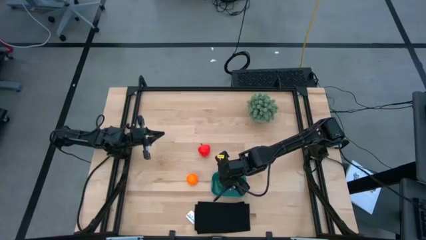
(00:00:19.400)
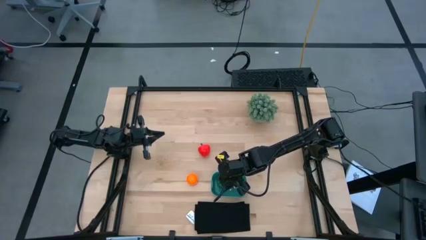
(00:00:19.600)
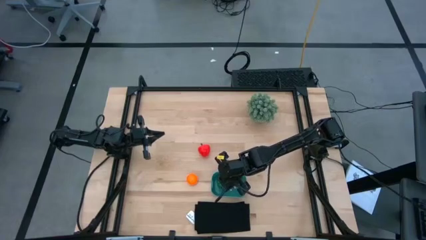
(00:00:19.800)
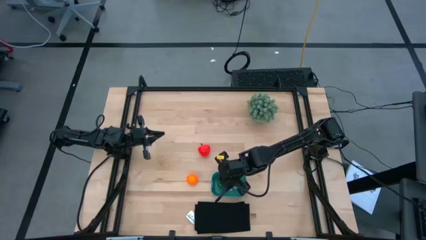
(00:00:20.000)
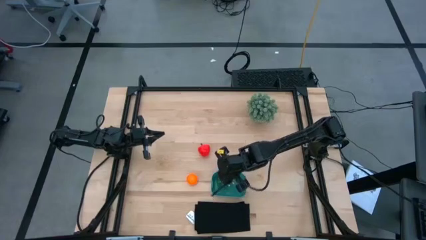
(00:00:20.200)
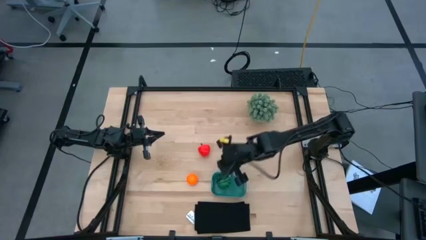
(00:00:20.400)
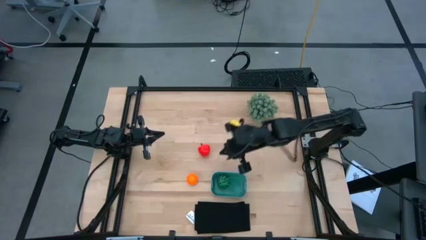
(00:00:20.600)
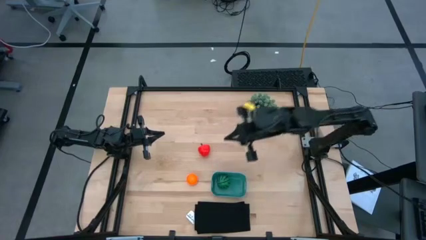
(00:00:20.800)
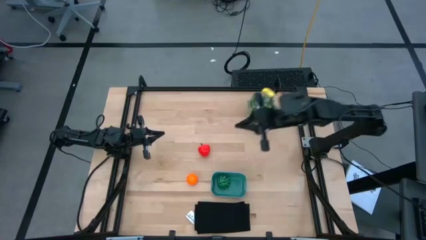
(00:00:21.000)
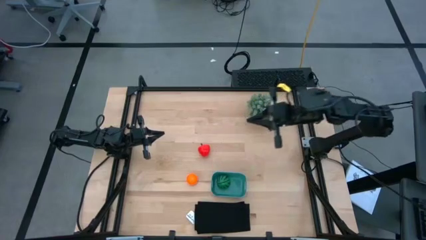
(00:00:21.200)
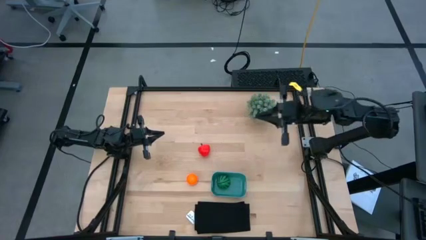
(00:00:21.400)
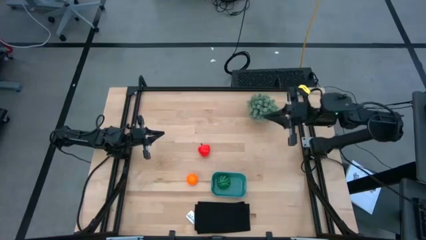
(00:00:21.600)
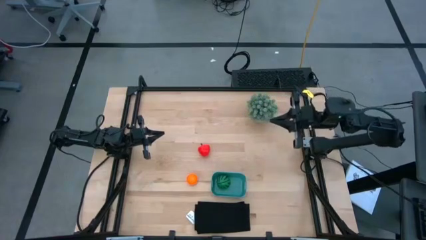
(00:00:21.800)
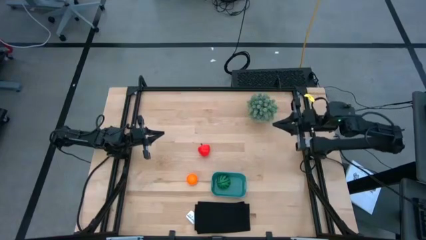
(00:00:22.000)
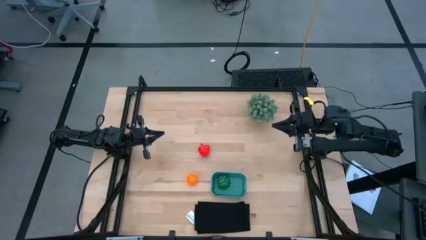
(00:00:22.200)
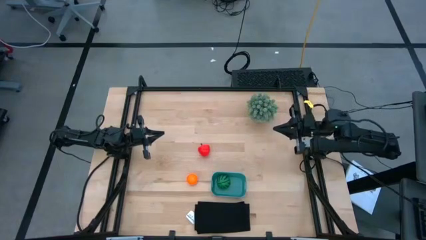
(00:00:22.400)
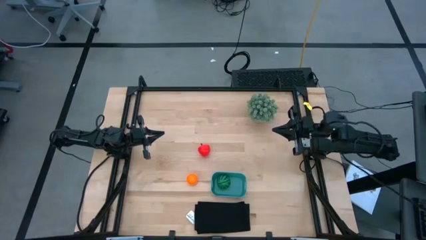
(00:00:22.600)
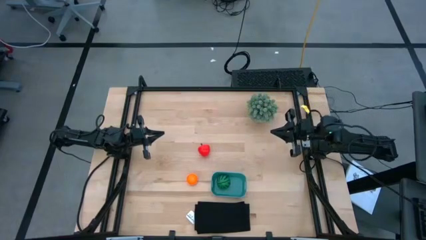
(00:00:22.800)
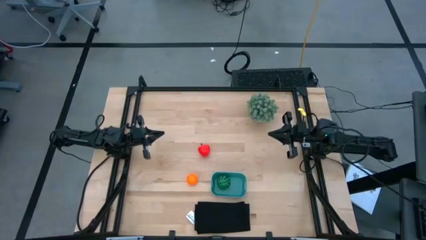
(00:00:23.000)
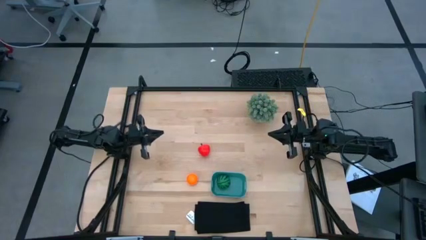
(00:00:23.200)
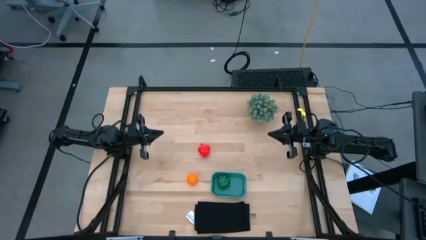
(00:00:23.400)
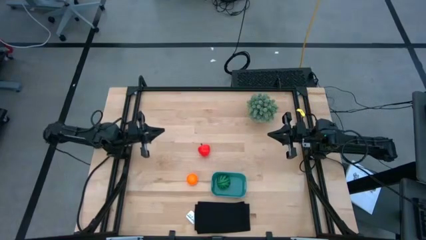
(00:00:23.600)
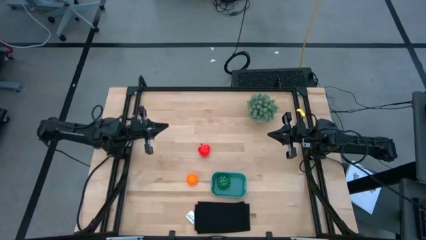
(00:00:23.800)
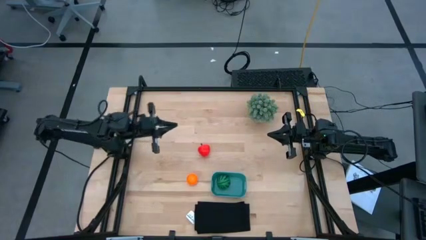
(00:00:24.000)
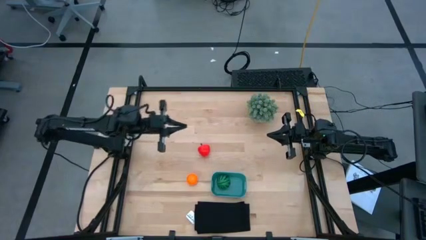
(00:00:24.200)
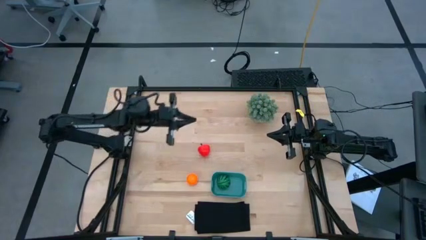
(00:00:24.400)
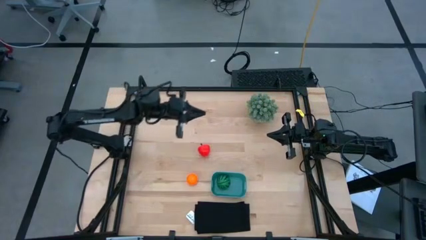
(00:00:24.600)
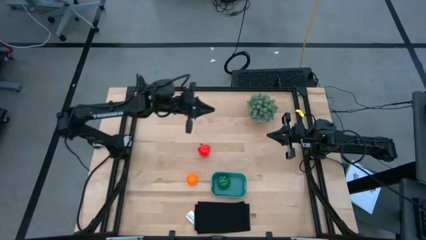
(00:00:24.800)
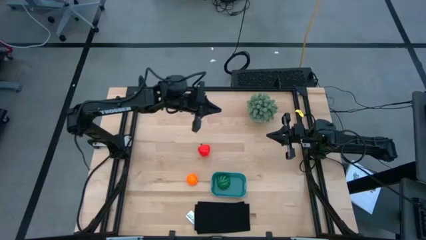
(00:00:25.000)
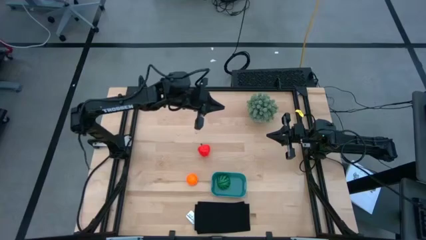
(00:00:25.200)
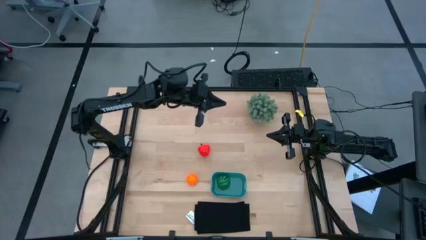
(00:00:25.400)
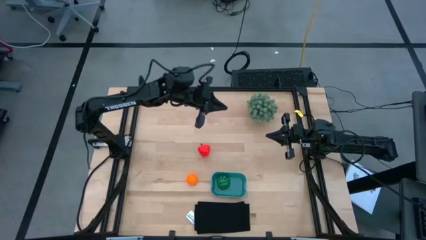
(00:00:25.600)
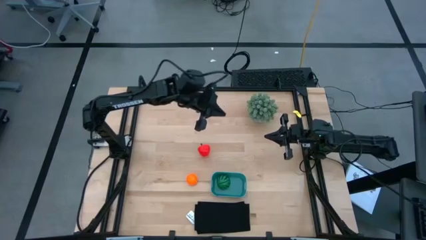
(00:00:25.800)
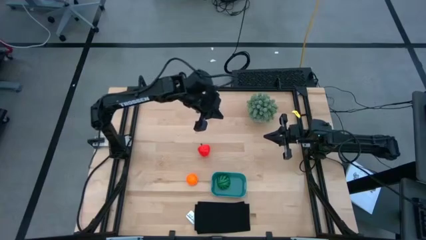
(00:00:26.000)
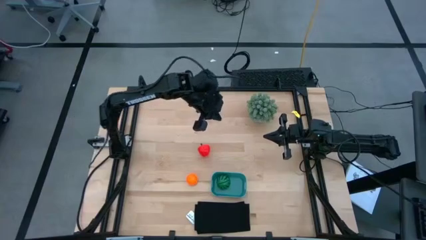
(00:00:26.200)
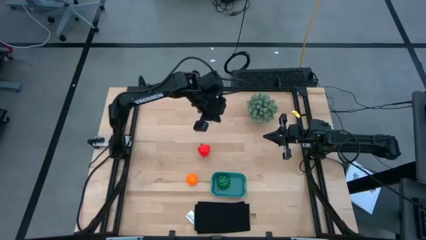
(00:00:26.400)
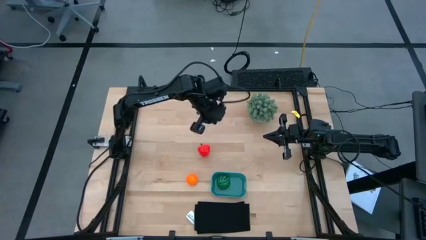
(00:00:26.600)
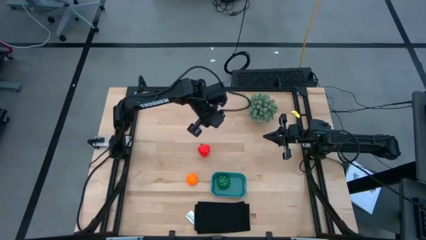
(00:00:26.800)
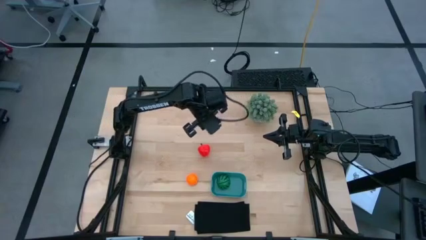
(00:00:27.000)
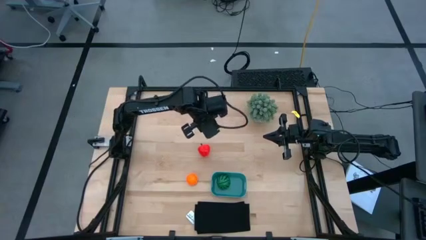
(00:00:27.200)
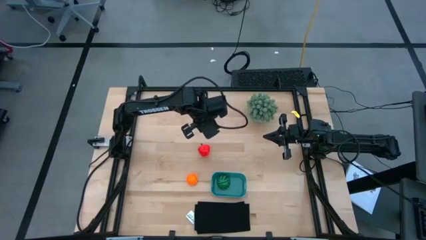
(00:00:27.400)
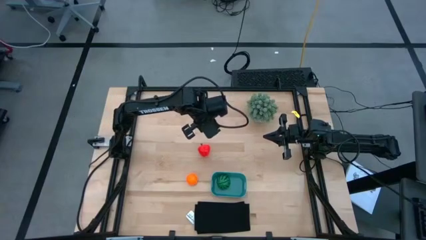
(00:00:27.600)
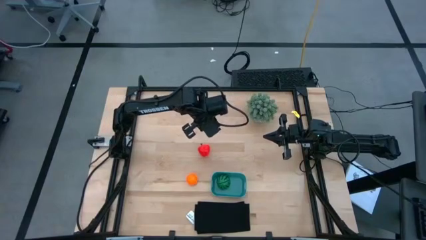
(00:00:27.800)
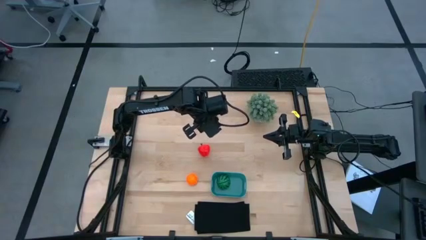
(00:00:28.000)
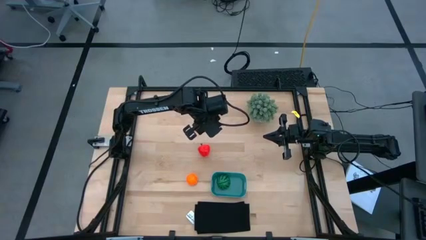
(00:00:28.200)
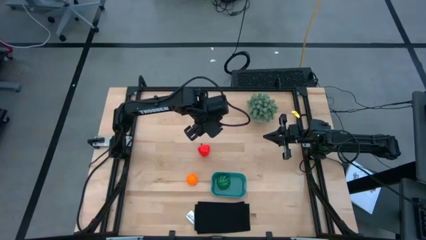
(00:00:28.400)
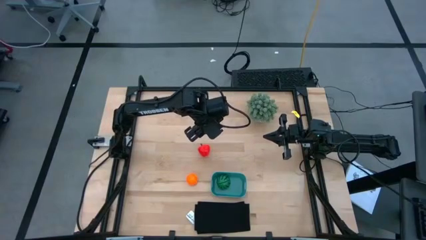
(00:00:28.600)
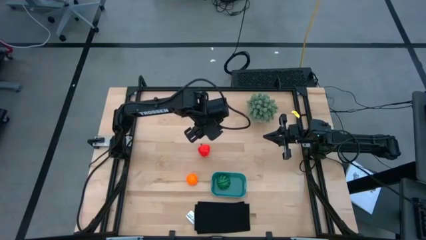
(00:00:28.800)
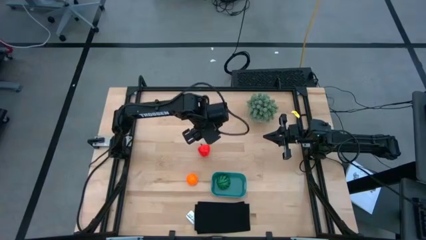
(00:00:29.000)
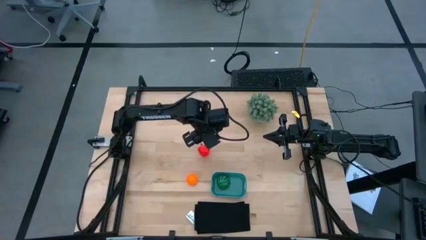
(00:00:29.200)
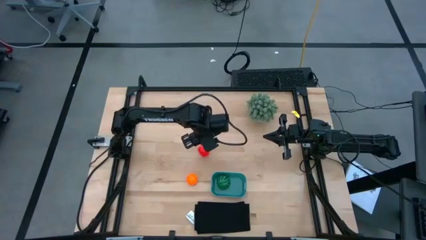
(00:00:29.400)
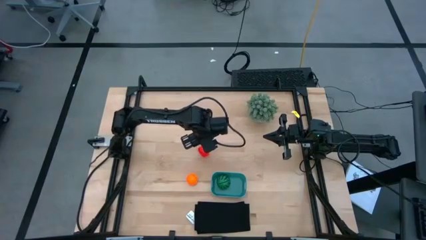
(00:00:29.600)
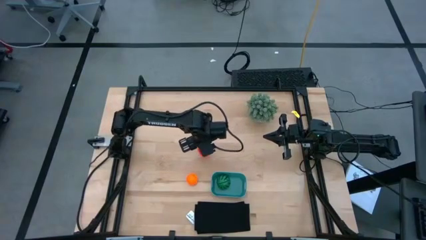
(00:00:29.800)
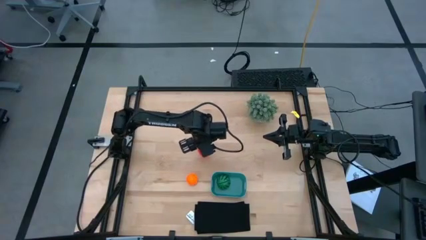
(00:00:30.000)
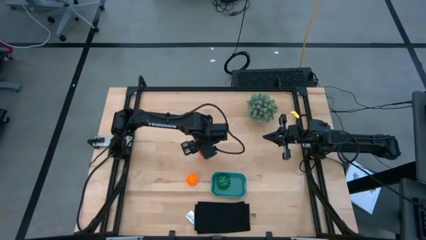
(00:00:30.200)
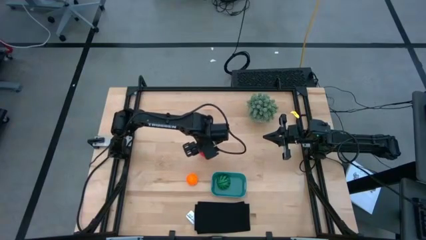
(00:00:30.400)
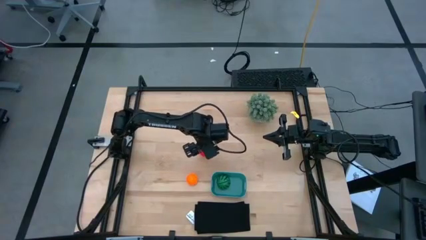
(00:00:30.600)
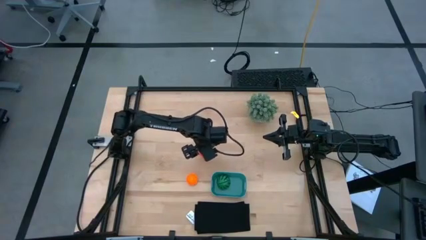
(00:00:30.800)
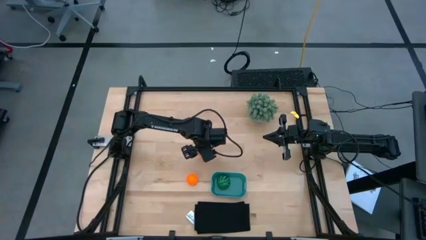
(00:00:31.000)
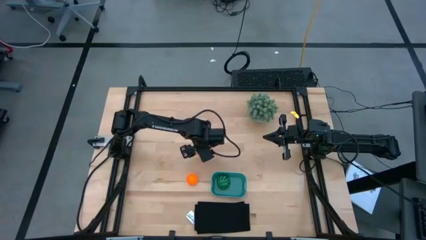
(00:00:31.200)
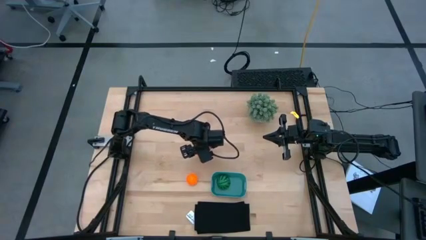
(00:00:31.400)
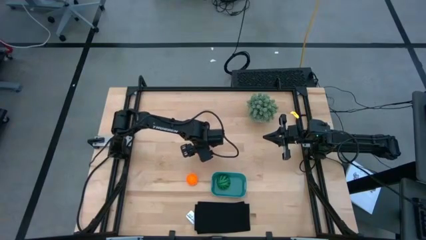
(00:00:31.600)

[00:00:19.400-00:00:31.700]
Task: Pick and placing Produce into tupperware
Put the apple toy into the green bin

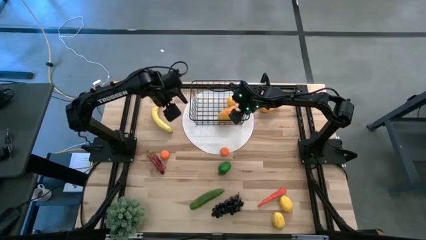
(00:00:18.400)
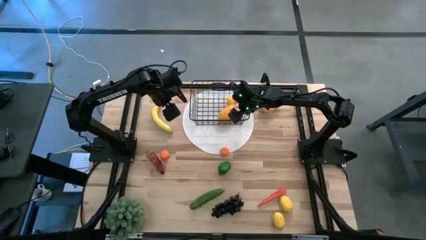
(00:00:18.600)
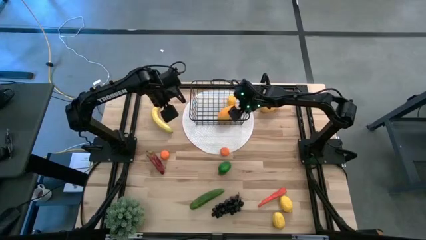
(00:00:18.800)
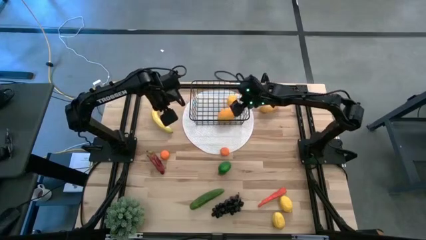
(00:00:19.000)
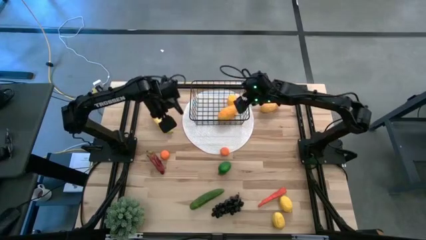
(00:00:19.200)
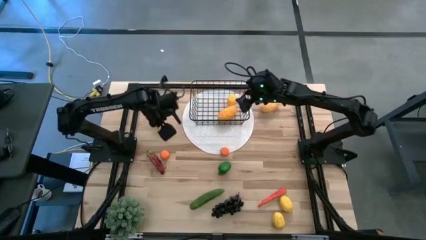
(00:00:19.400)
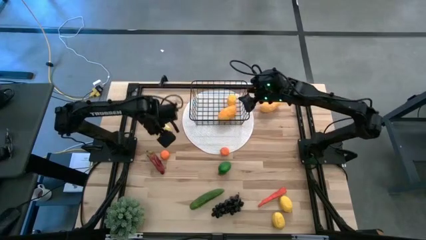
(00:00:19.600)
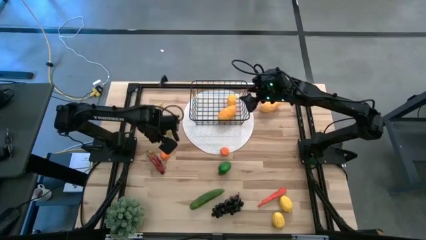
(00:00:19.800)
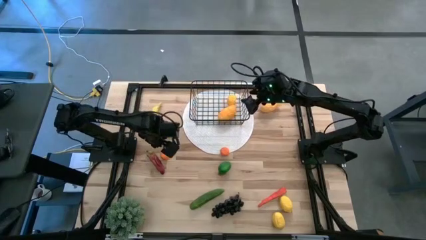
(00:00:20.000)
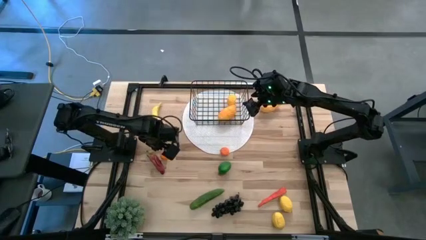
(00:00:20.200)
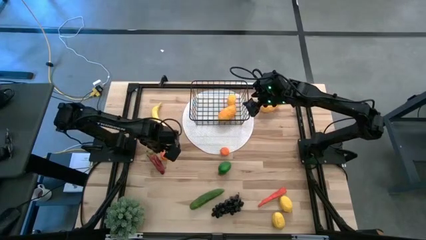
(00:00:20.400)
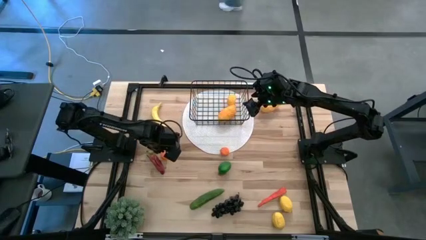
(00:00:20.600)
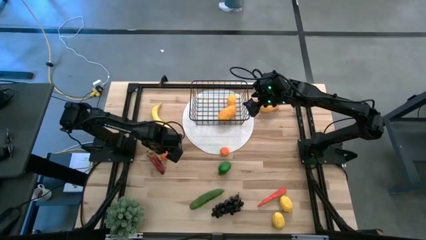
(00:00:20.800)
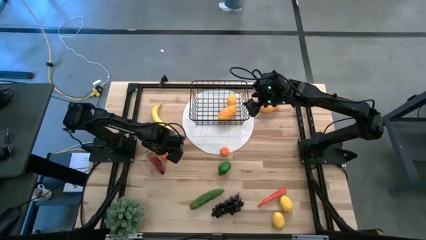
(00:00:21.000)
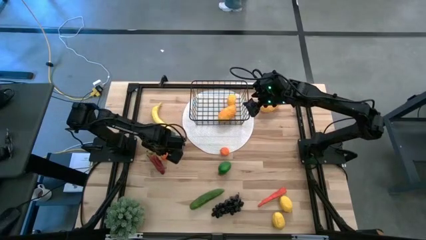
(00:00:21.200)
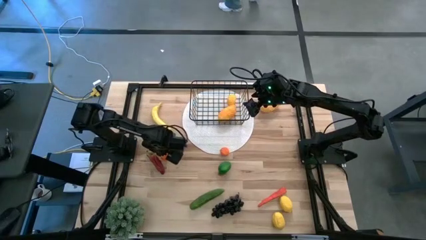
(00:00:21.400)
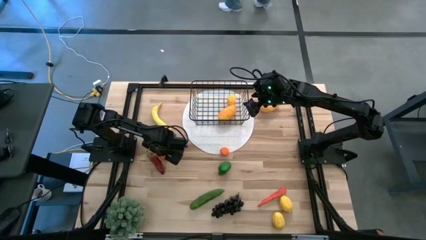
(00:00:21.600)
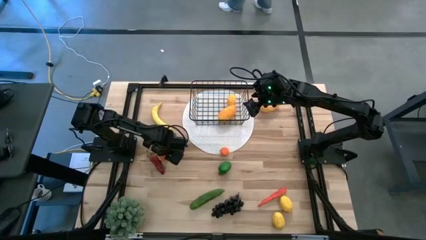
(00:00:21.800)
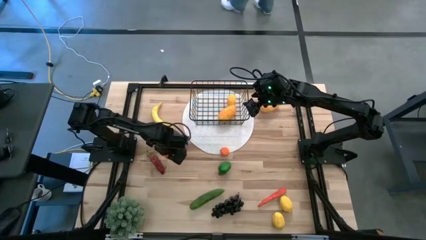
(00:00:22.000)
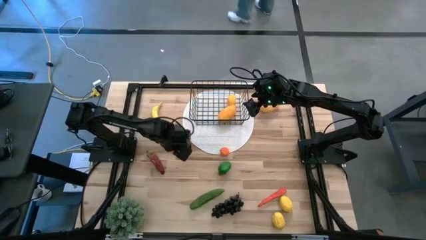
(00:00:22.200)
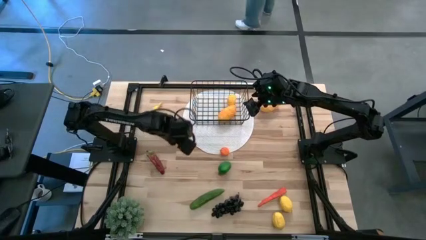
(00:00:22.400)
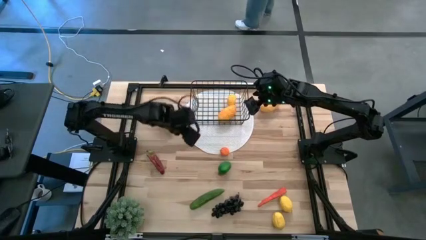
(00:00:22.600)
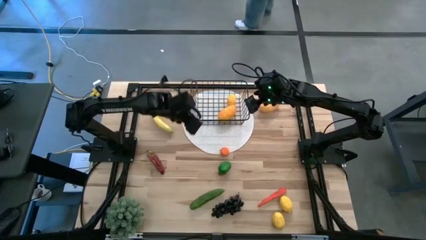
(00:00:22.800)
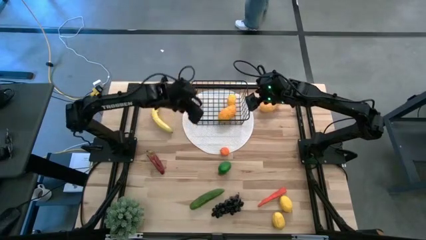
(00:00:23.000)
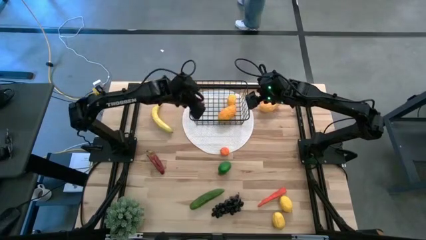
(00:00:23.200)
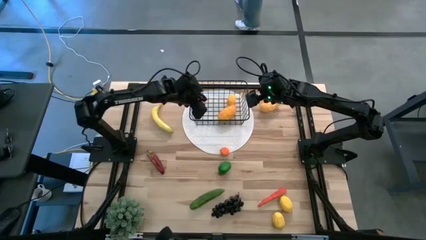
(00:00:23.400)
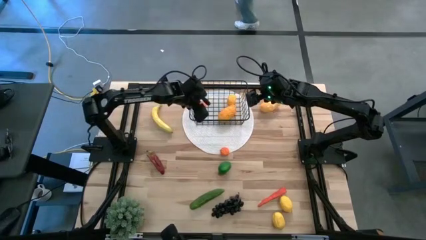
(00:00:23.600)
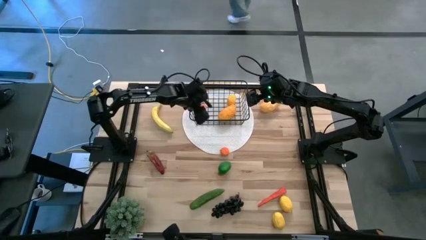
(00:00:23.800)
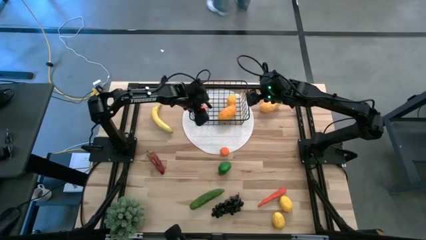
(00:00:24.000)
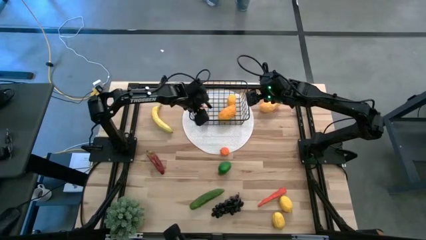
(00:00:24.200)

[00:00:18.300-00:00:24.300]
Task: Build produce basket
Put the left orange into the wire basket
